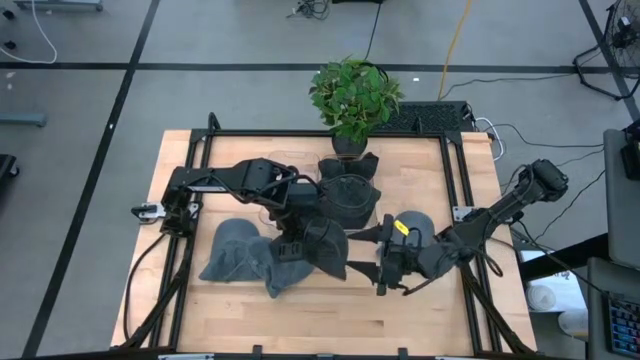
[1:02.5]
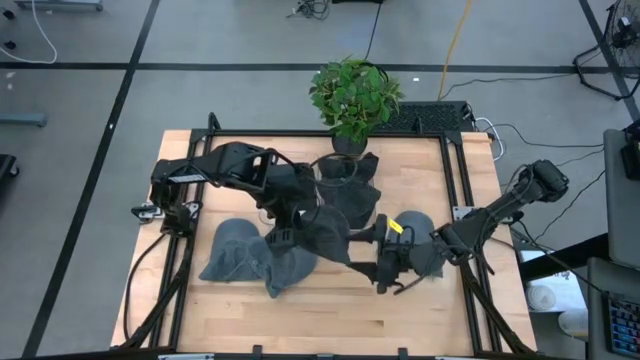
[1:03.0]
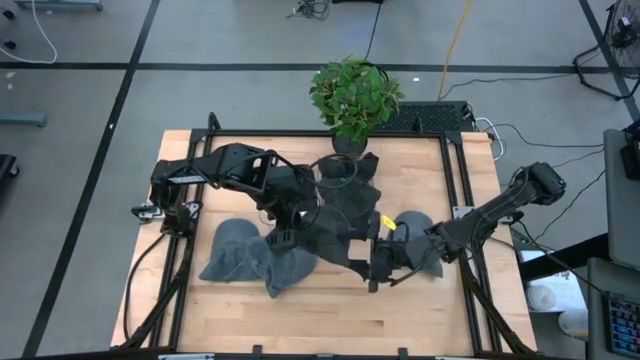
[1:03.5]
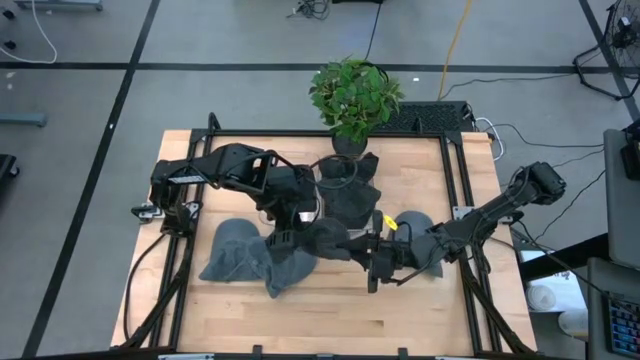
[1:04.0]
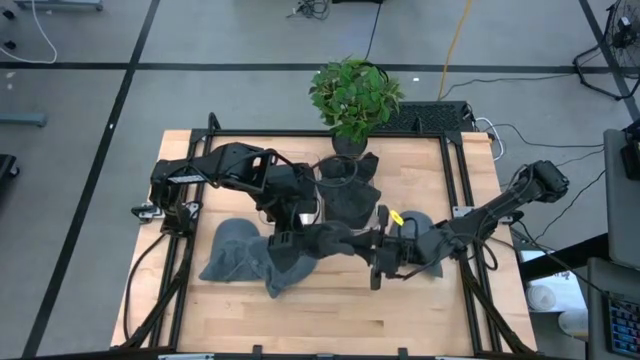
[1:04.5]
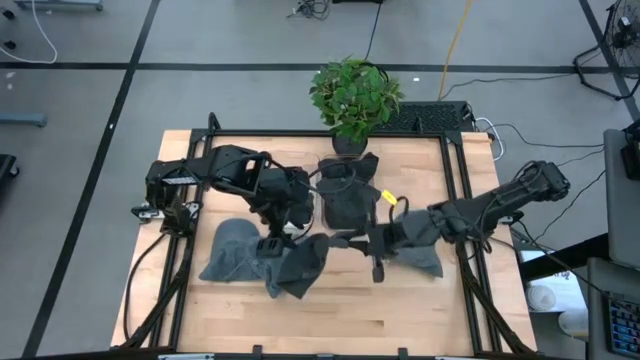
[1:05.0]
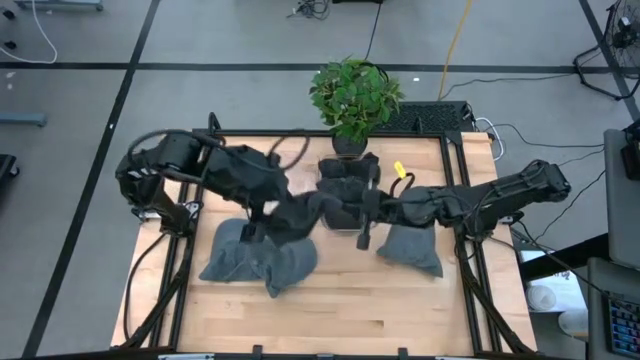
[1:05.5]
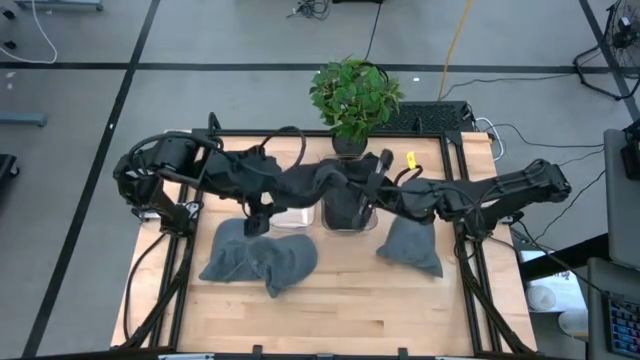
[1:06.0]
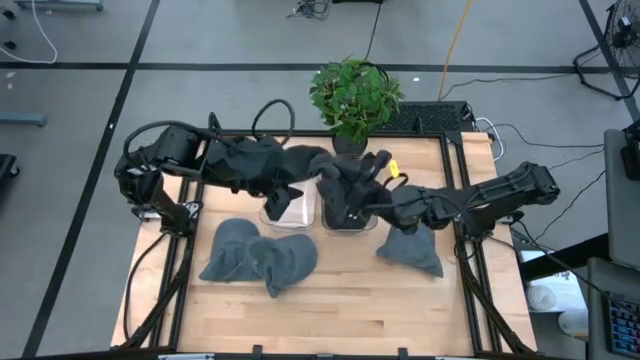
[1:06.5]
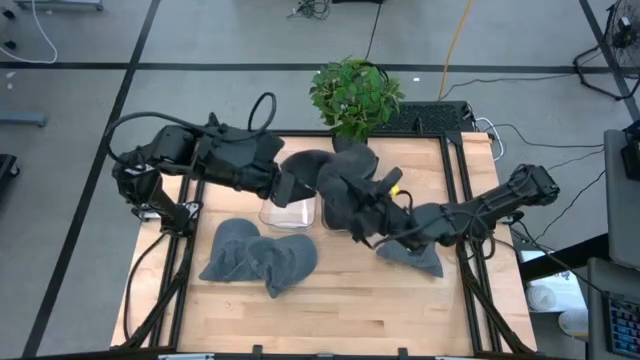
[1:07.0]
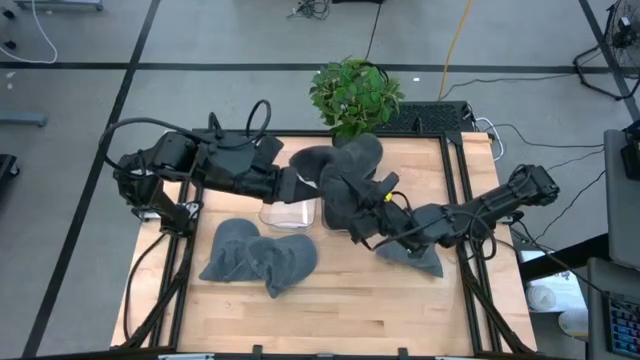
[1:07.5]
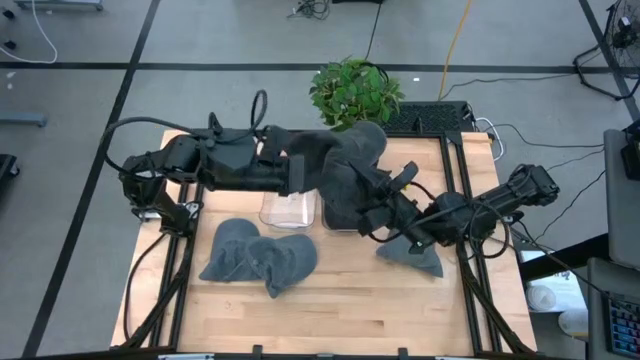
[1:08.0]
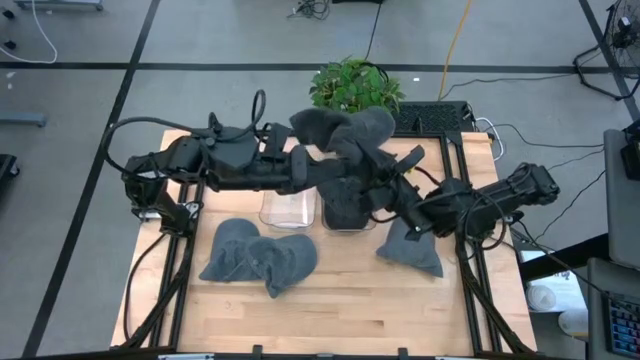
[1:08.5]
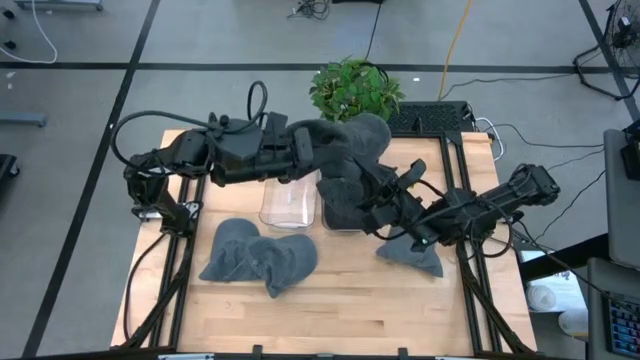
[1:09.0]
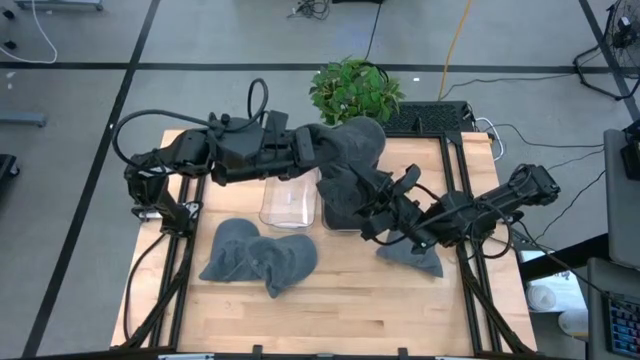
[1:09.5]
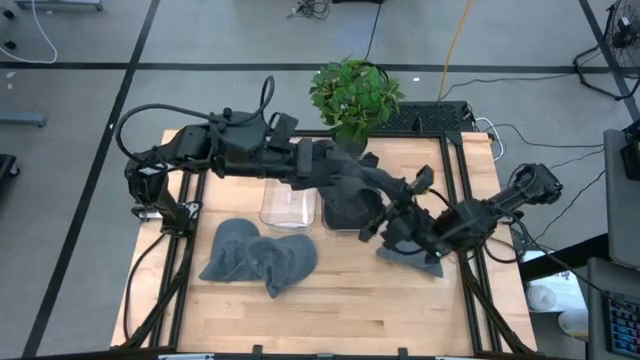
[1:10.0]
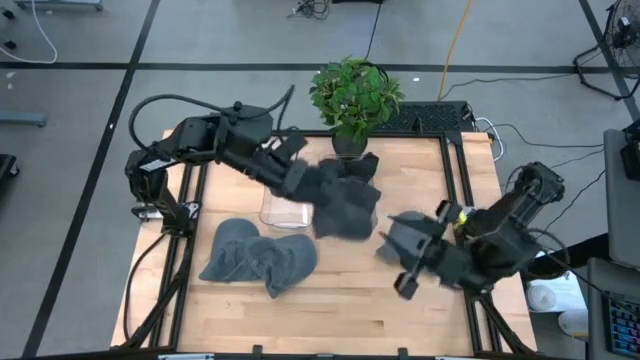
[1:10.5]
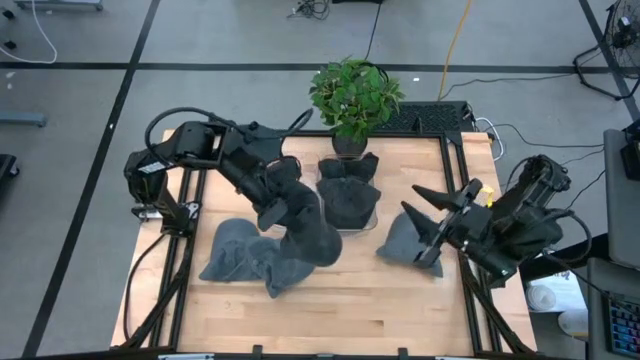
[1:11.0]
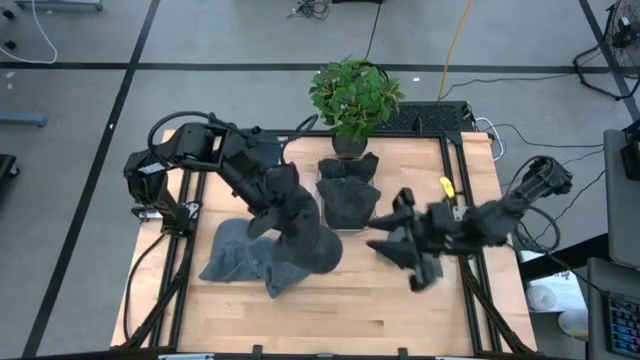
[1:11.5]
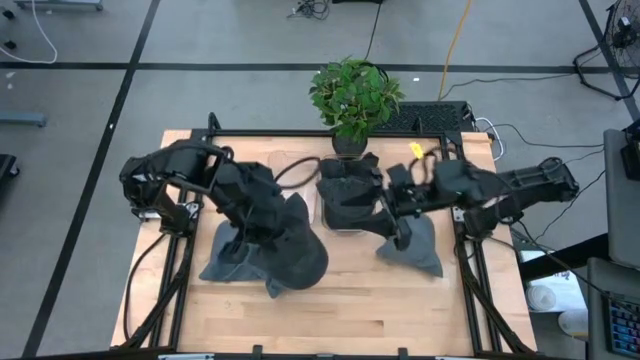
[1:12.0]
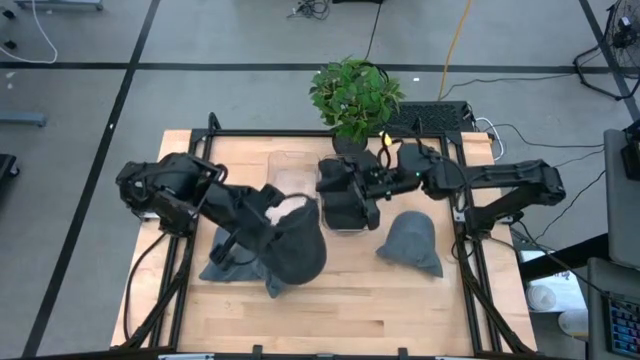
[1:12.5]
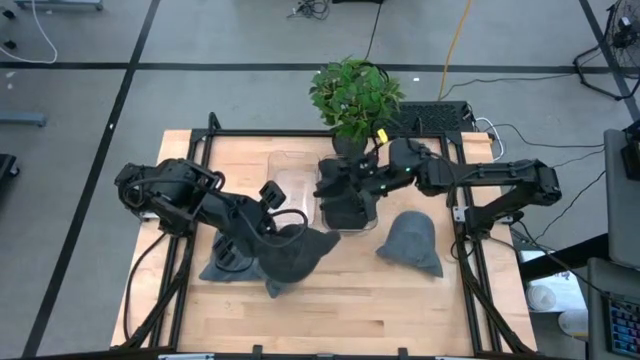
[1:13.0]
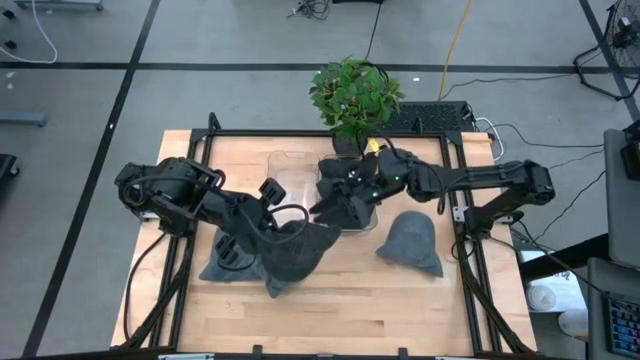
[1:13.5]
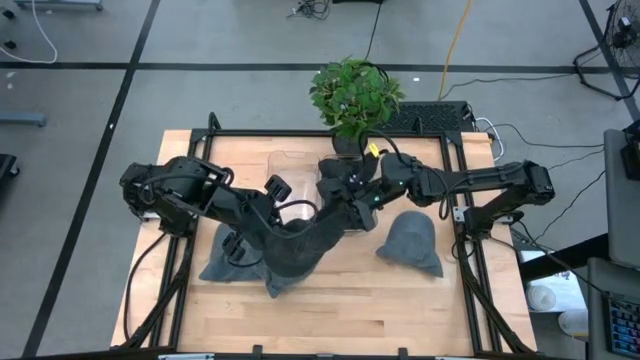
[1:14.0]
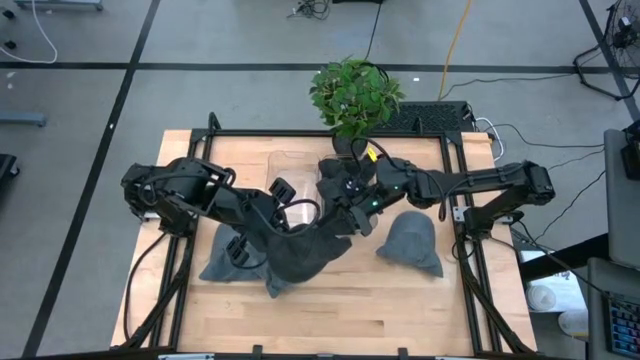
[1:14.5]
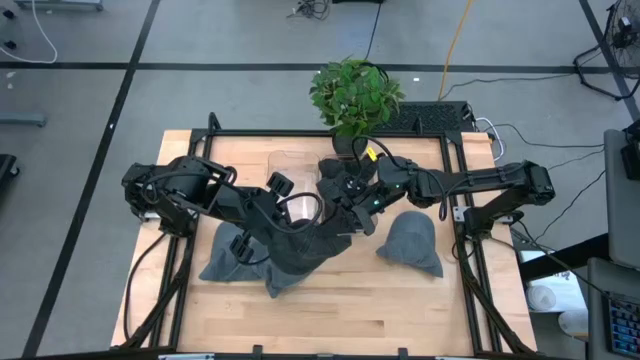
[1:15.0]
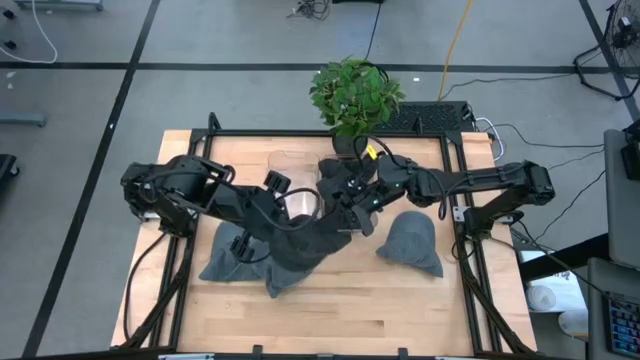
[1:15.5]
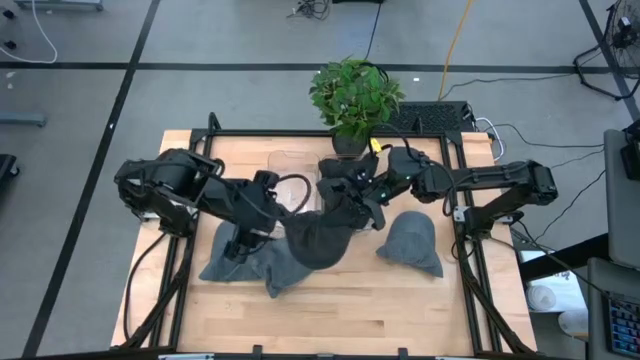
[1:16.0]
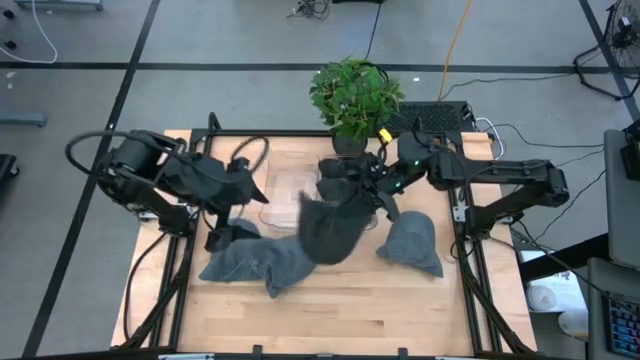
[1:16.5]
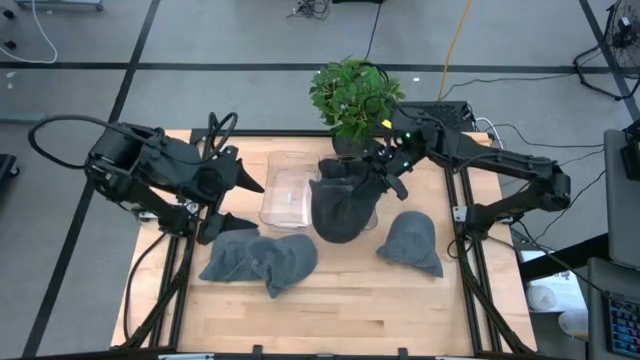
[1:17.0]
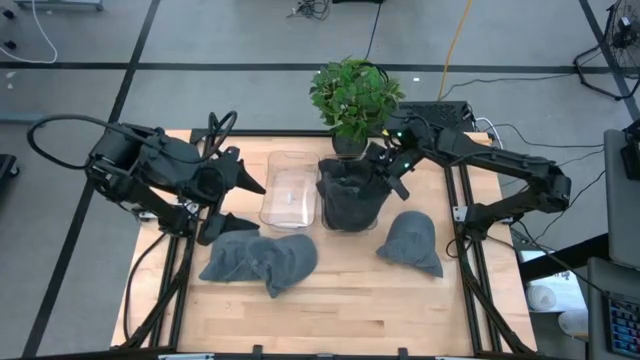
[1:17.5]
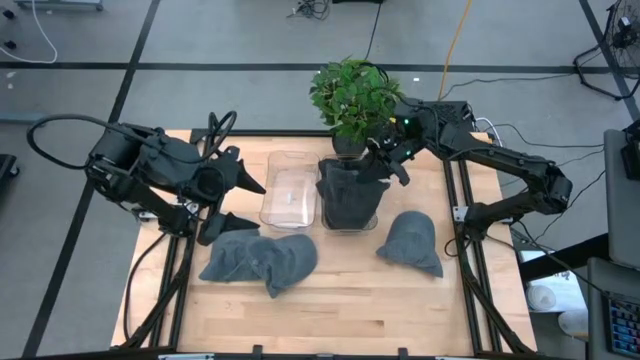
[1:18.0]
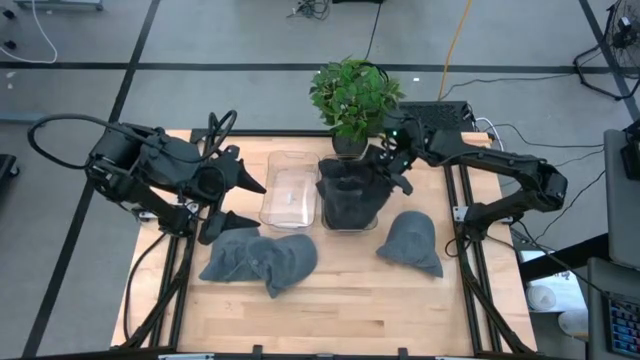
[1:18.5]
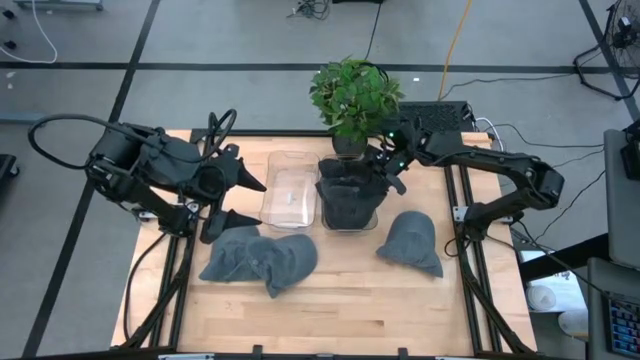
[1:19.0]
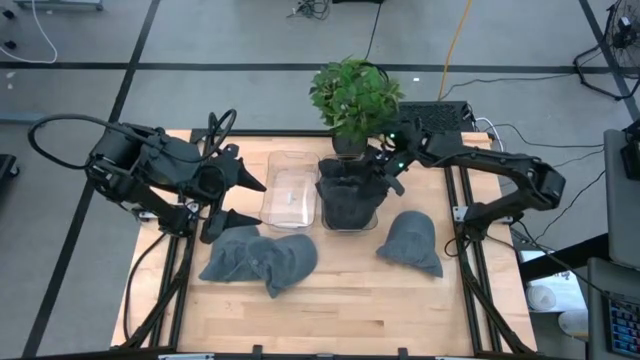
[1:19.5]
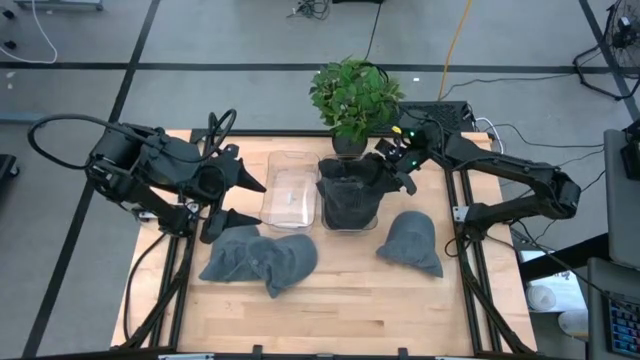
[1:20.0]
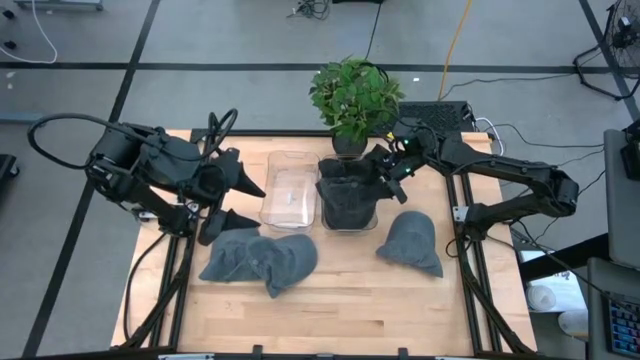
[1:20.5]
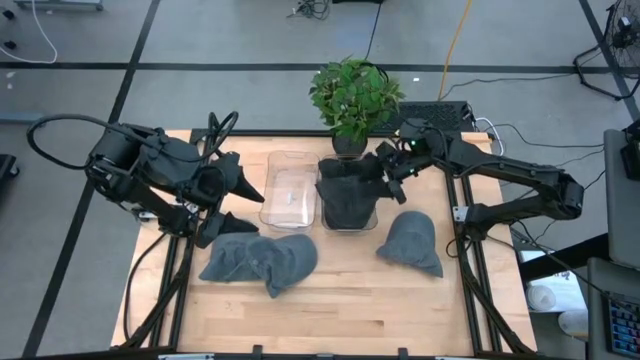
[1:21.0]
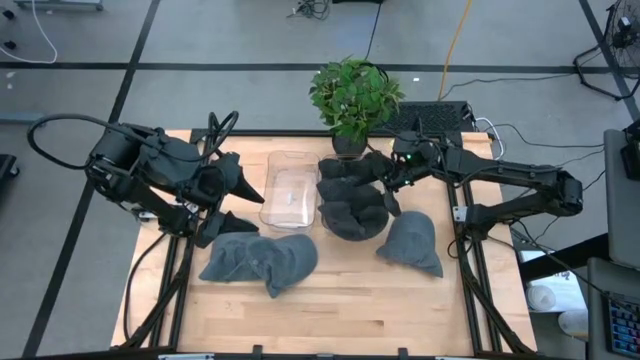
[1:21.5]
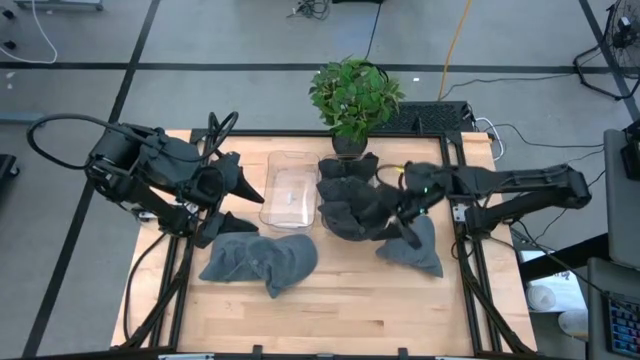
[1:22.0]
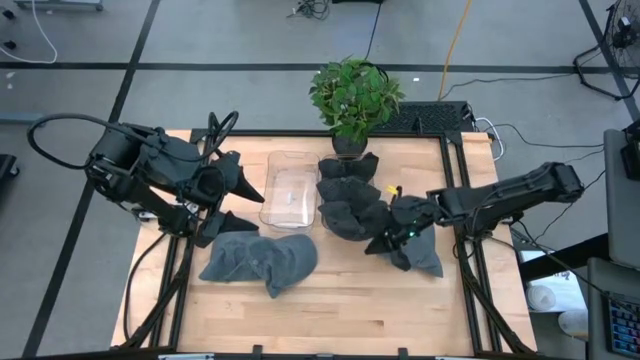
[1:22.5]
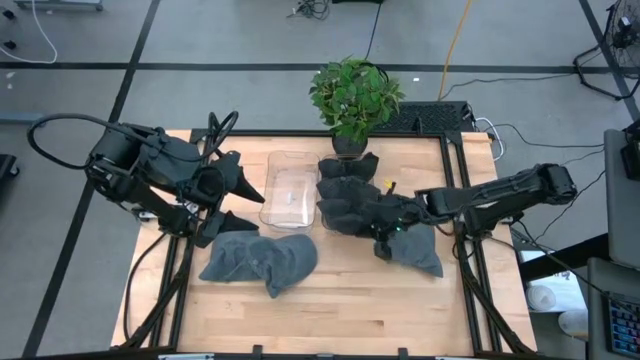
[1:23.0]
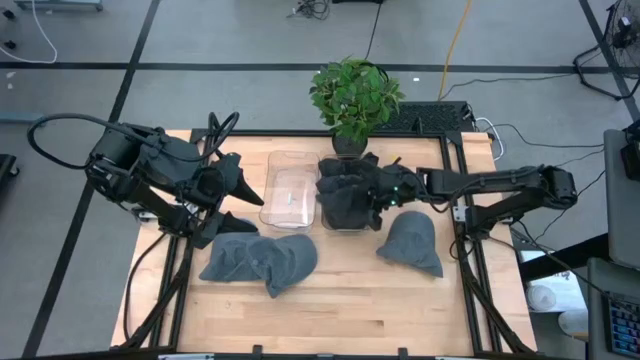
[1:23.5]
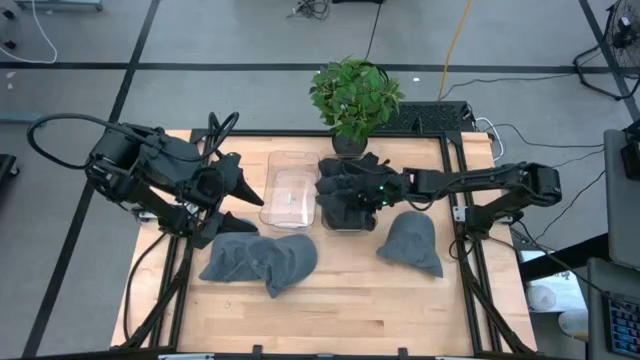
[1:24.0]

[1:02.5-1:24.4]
Task: Pick & Place hat
Put the black cap into the right transparent bin
